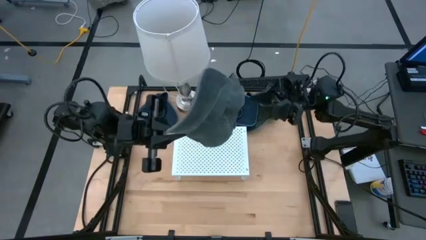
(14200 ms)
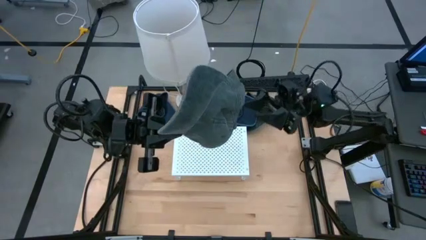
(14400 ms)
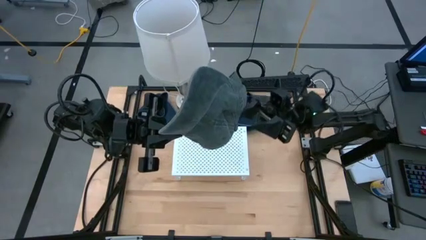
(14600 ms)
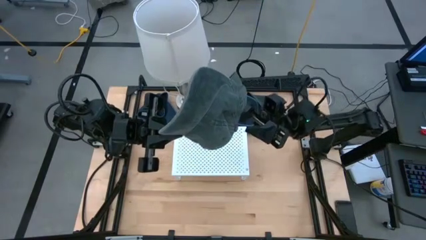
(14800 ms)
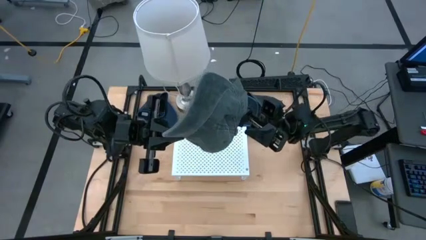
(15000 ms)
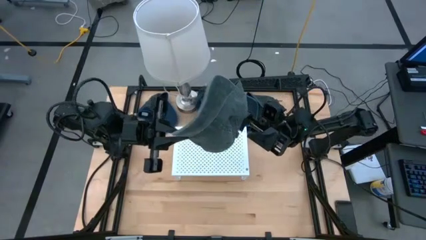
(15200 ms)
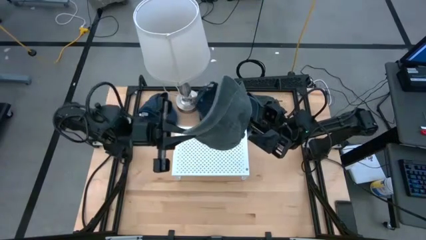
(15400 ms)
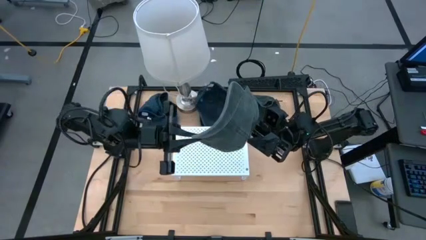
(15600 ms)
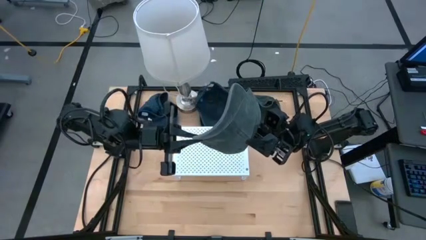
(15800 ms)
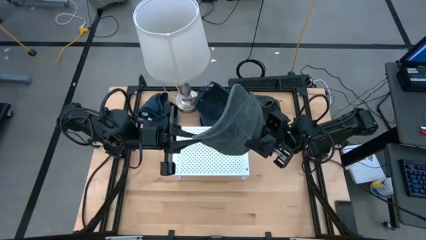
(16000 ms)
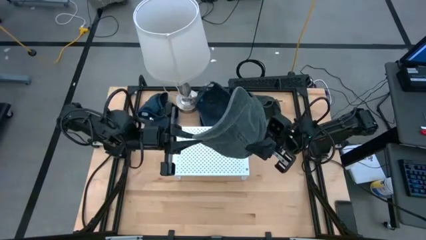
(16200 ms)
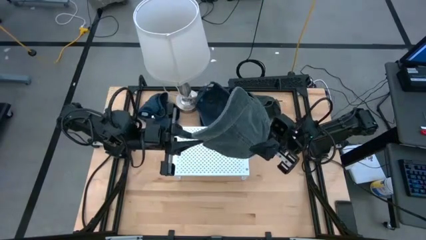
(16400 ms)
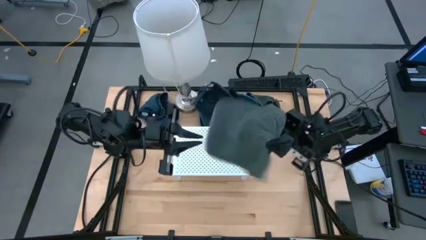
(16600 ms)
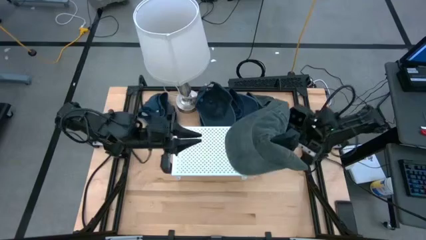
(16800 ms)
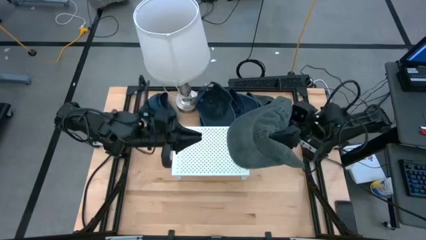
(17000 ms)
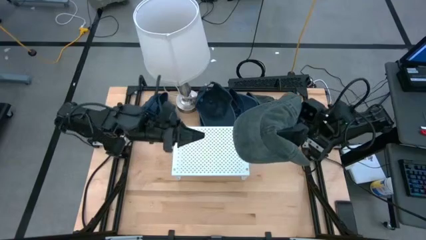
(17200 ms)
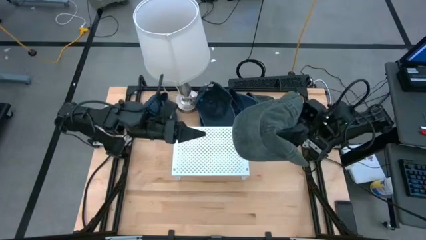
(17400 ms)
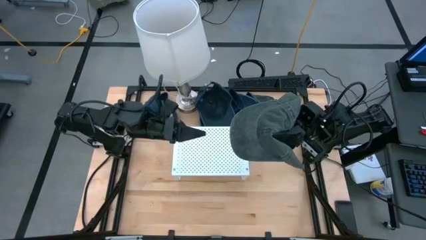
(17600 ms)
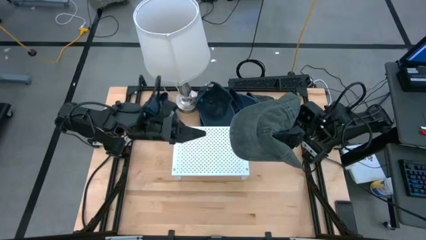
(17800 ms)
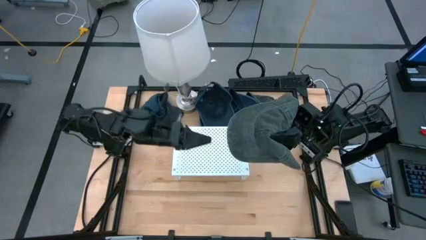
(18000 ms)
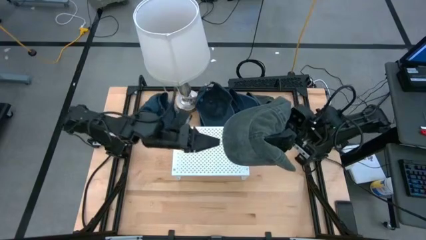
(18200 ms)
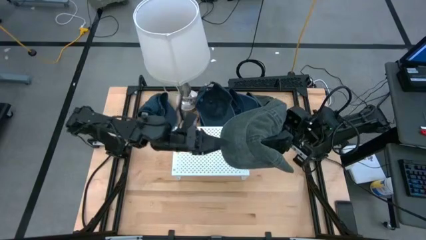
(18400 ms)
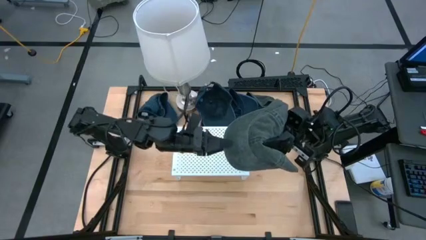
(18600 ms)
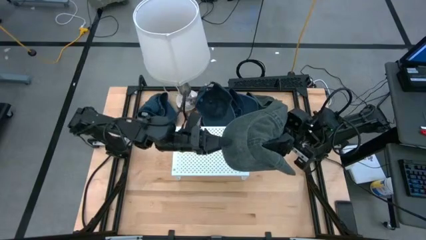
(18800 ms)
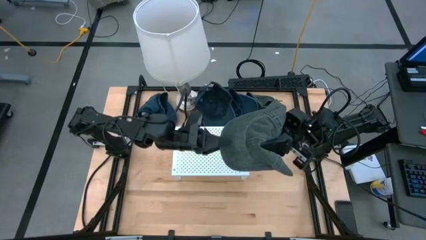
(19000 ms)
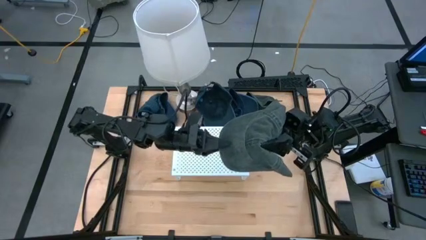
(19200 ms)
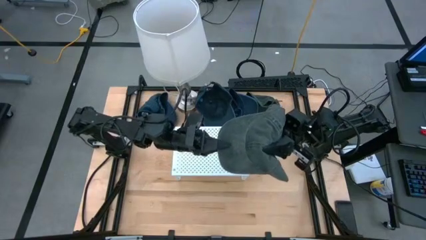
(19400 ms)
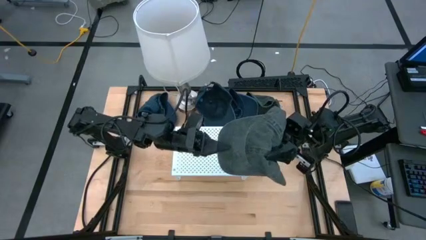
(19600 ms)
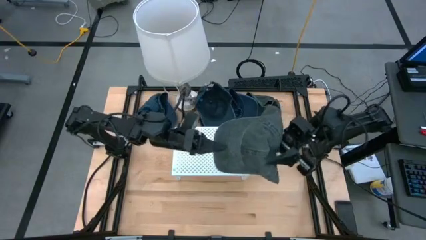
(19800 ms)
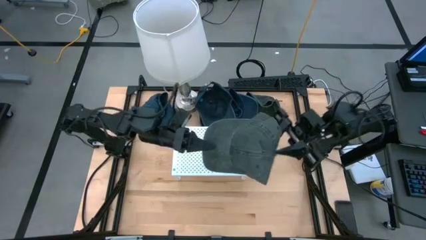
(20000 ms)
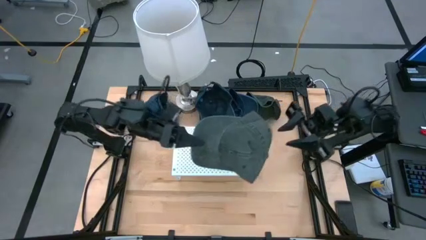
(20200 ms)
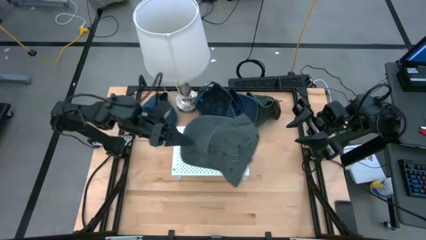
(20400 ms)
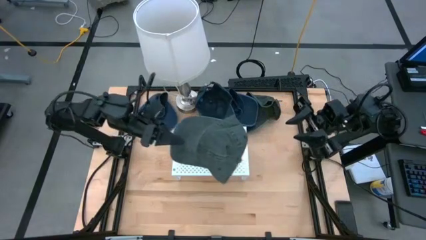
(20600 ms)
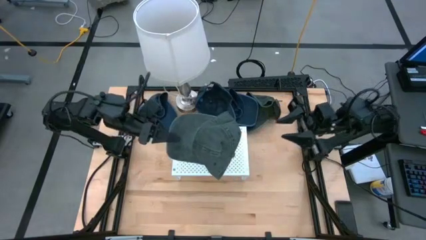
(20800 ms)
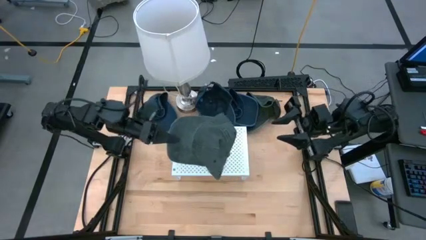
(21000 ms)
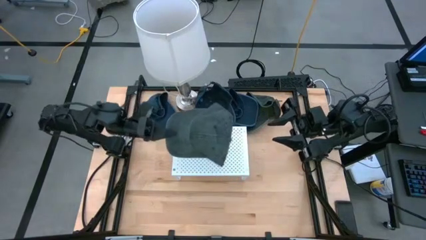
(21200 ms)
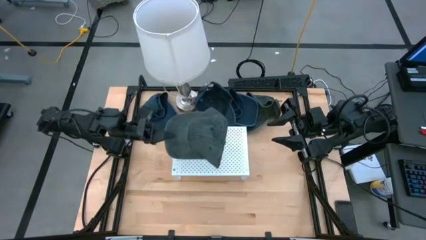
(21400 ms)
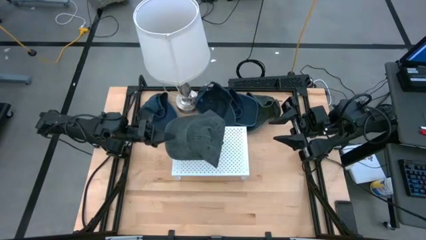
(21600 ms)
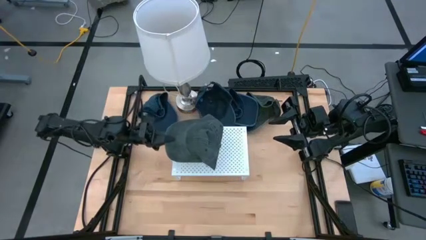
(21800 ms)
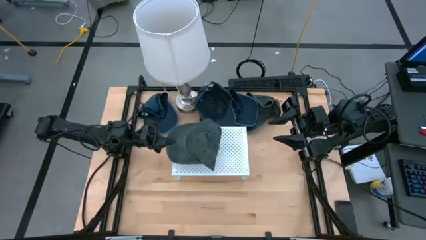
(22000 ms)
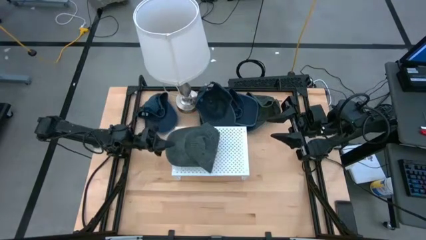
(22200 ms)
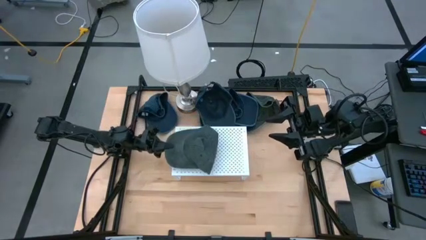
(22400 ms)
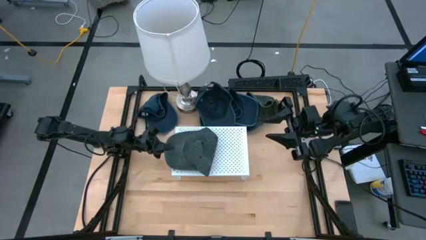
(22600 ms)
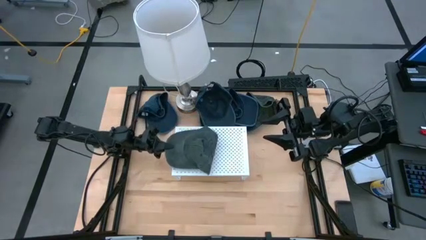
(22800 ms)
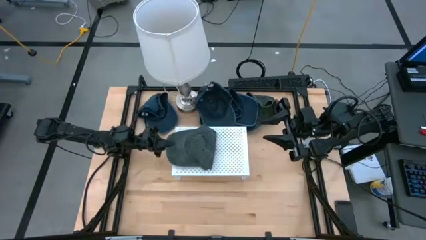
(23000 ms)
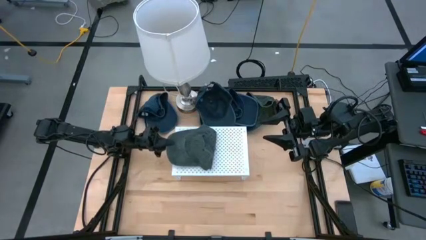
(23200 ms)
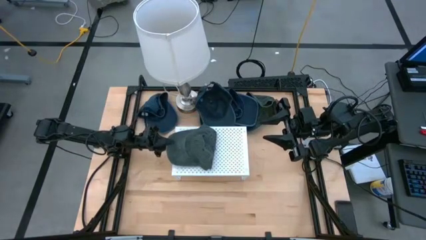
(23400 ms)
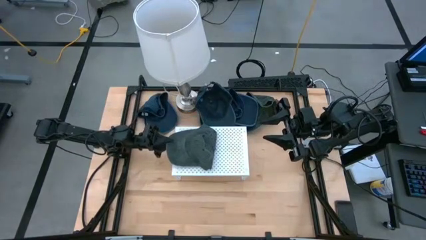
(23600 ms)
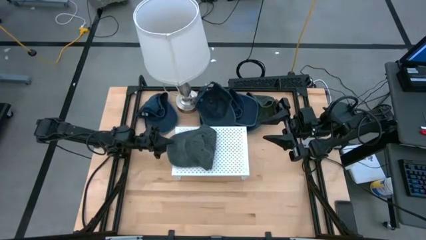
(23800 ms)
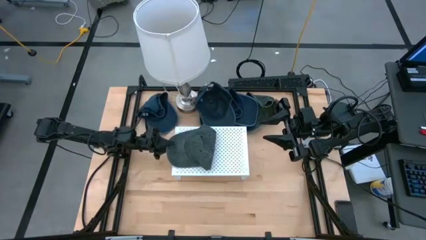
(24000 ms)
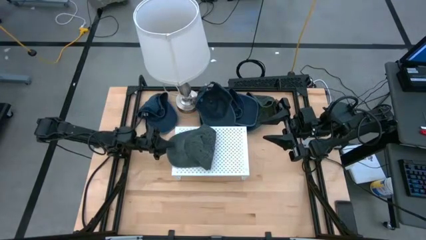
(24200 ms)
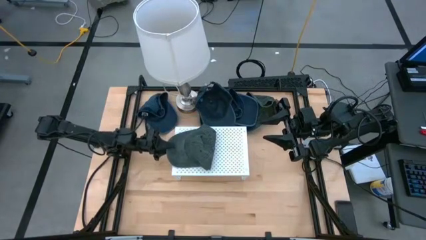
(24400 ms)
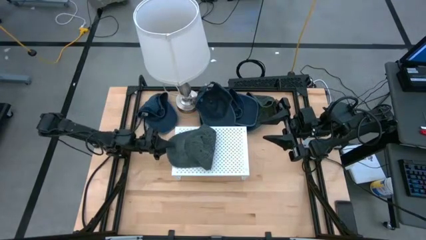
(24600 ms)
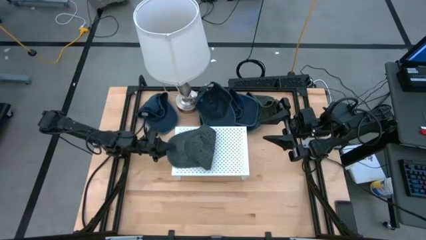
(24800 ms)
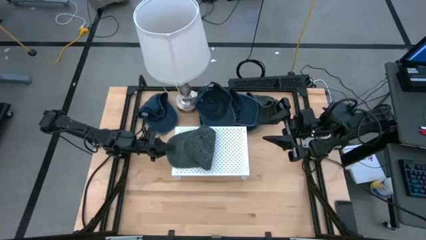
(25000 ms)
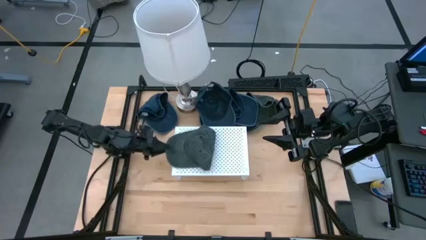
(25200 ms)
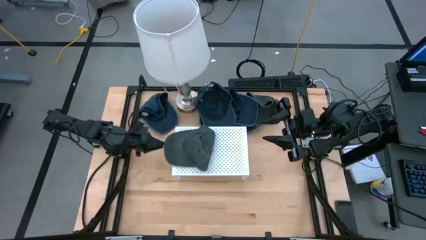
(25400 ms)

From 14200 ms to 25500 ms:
Task: Pick & Place hat
Put the bottom left black cap on the left side of the shelf
